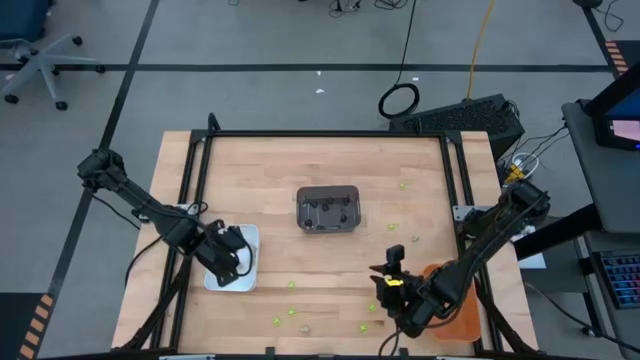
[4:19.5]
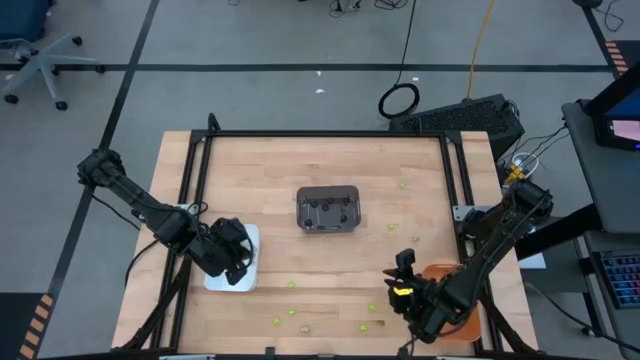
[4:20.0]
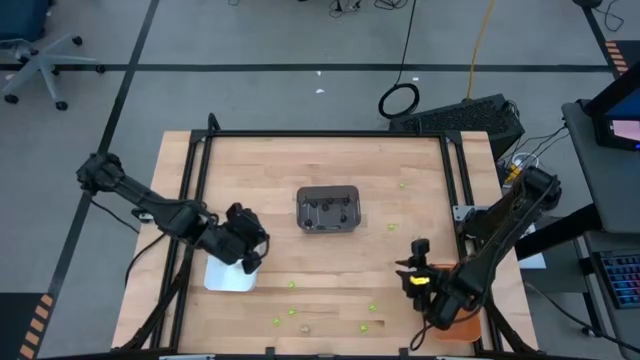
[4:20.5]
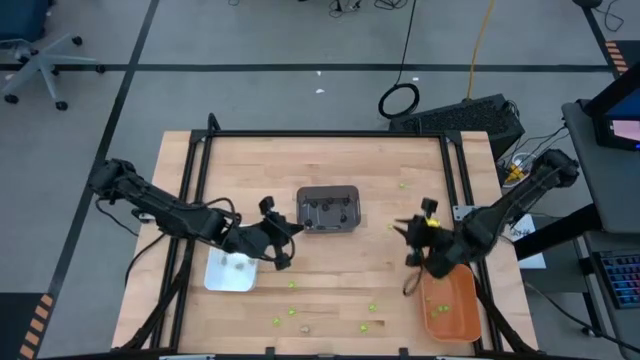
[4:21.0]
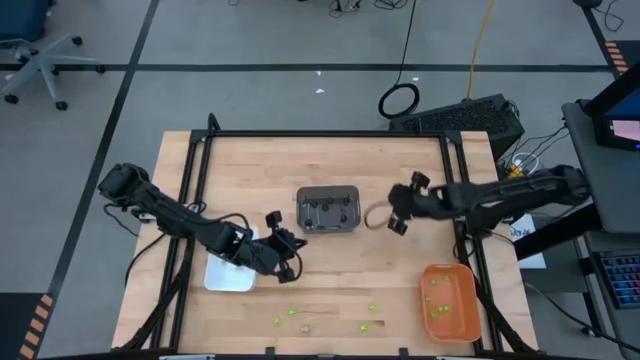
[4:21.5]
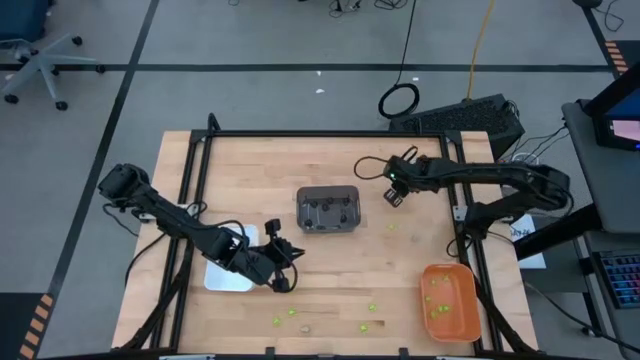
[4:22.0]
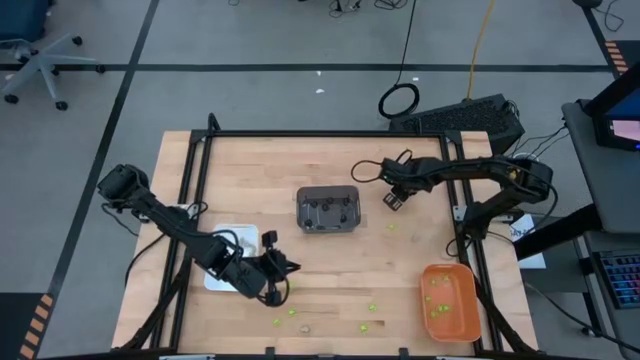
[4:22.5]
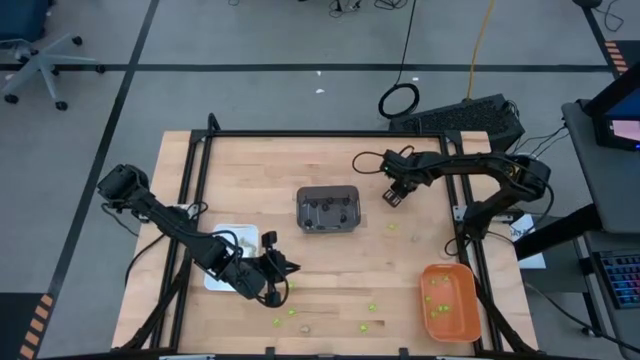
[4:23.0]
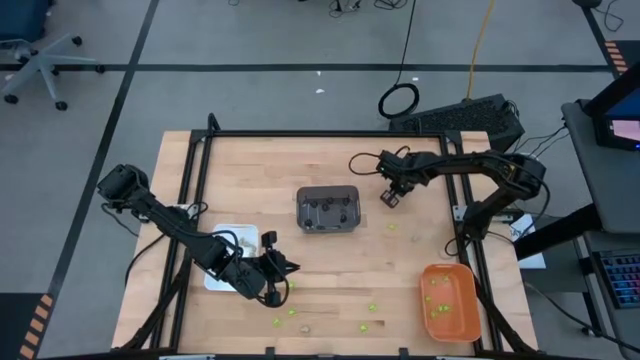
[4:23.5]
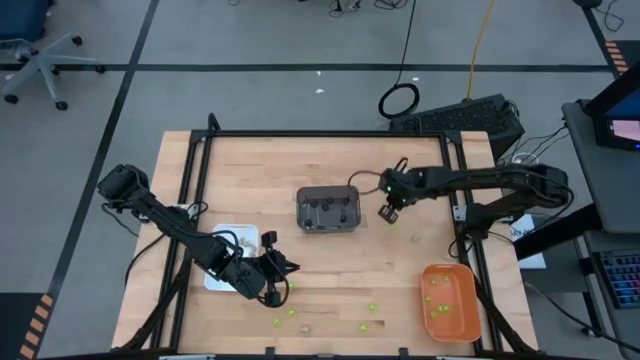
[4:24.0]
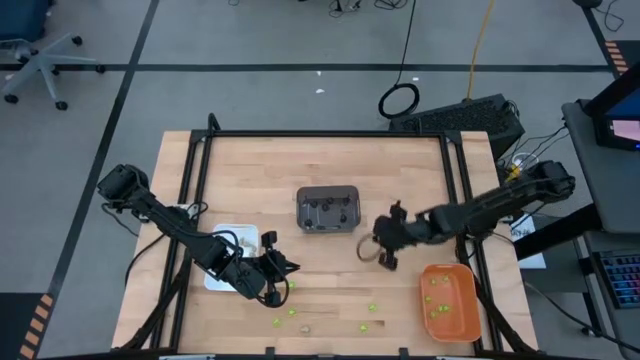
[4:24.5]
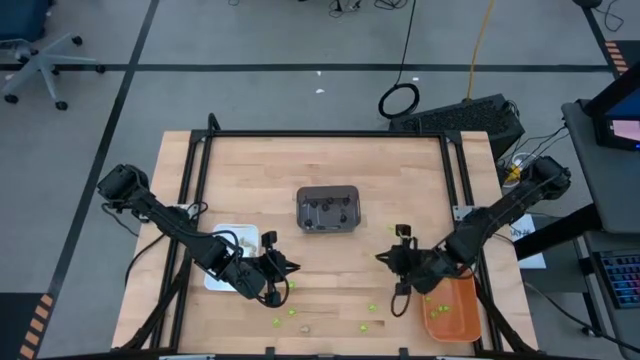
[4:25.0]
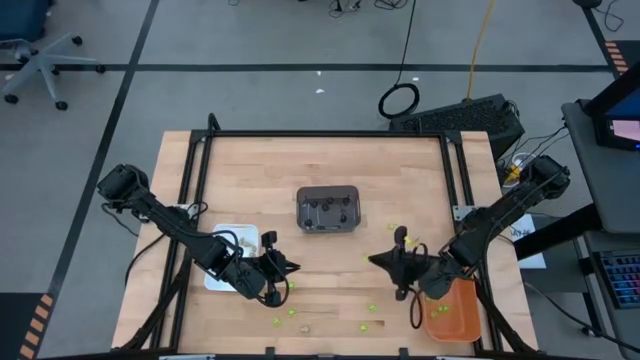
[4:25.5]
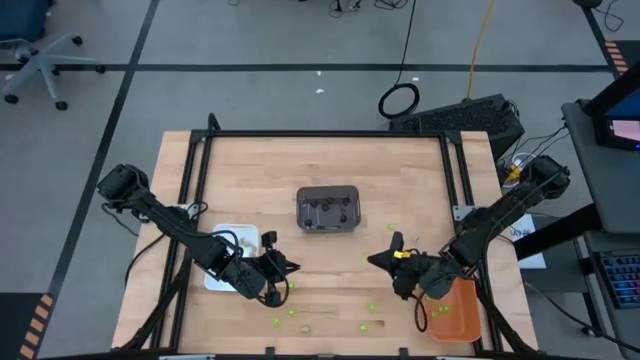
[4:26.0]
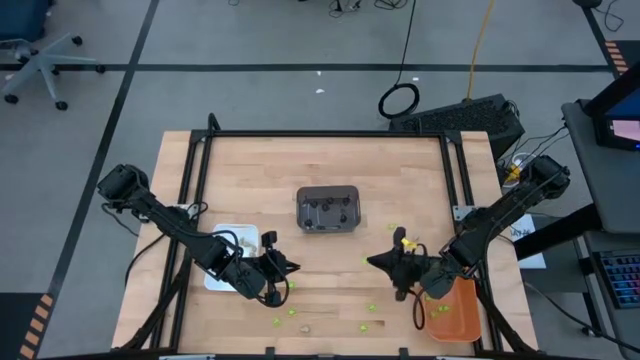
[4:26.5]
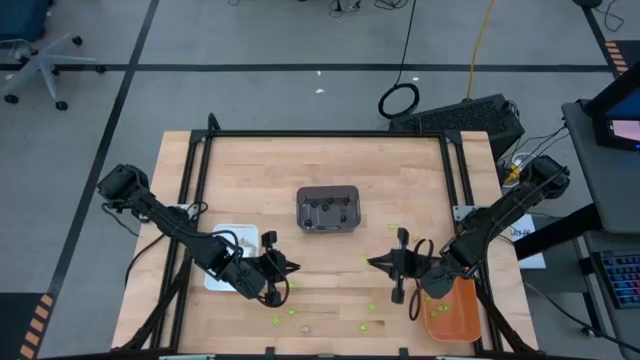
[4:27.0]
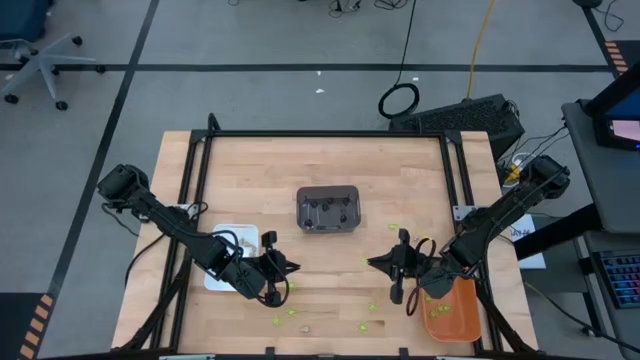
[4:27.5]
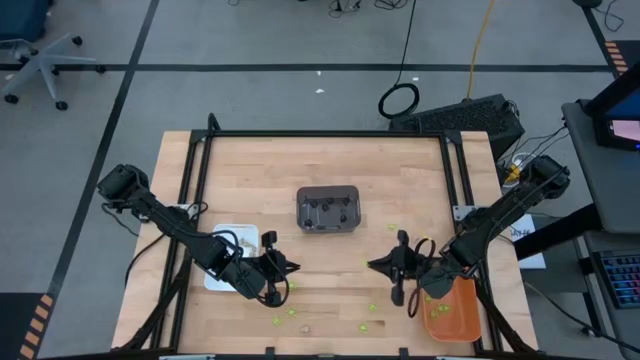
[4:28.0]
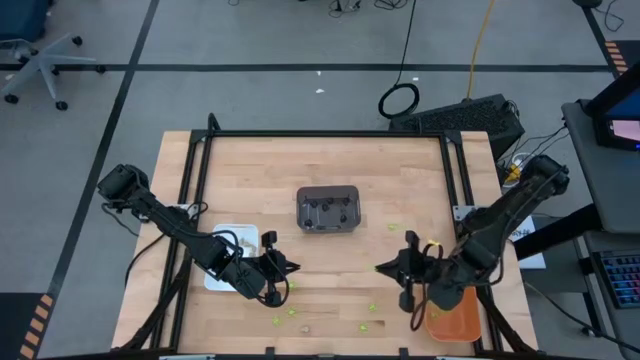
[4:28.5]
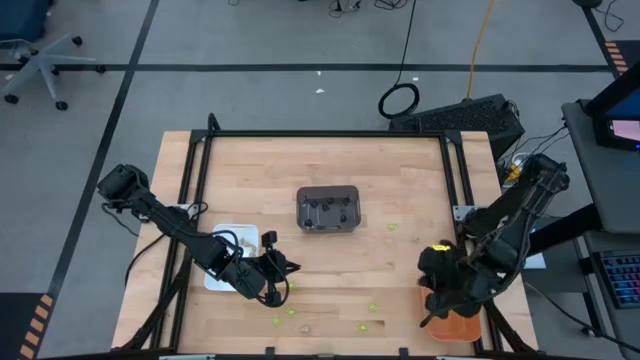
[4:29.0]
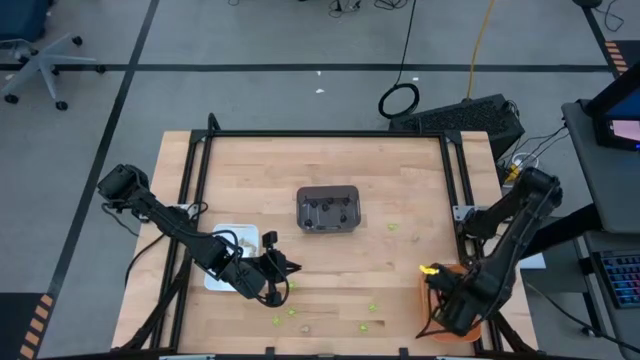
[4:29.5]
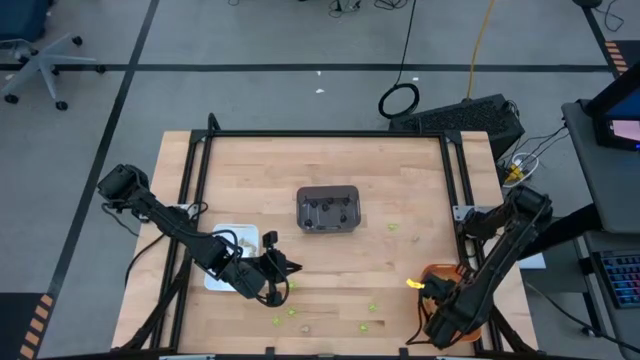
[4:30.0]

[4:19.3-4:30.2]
Task: Sort Halloween decoration
Put the green spider toy into the orange bin

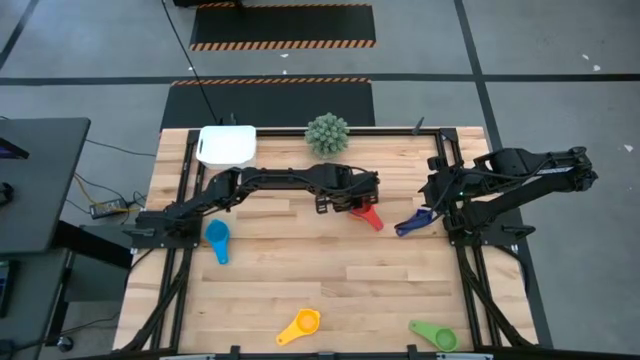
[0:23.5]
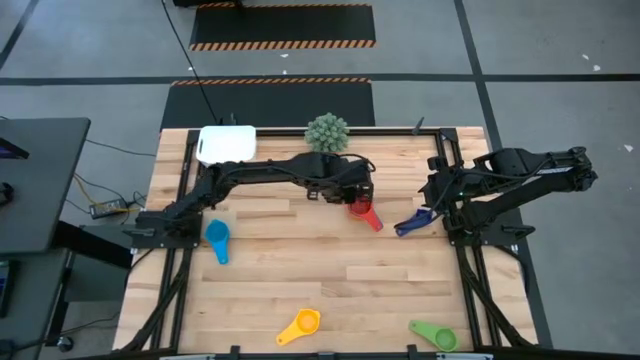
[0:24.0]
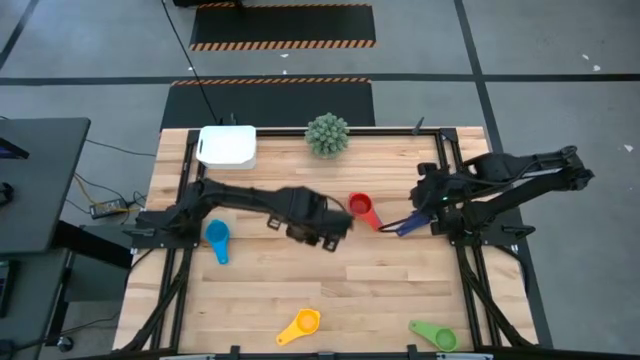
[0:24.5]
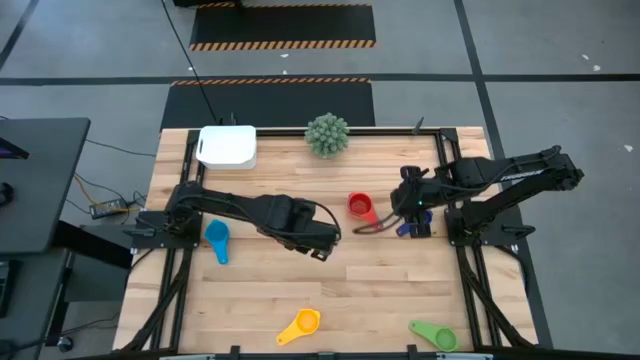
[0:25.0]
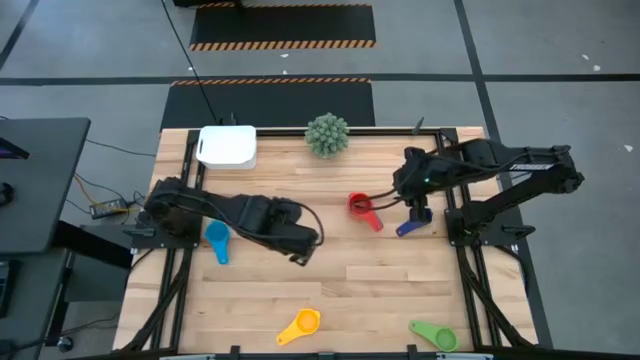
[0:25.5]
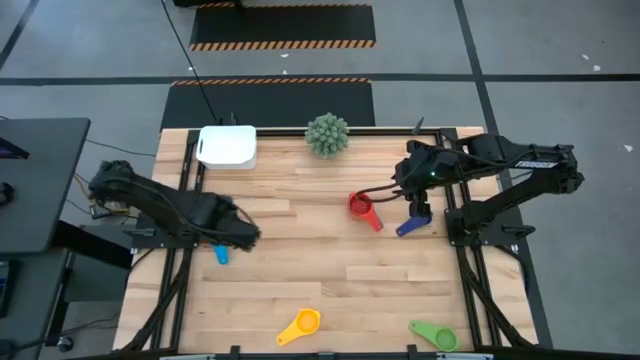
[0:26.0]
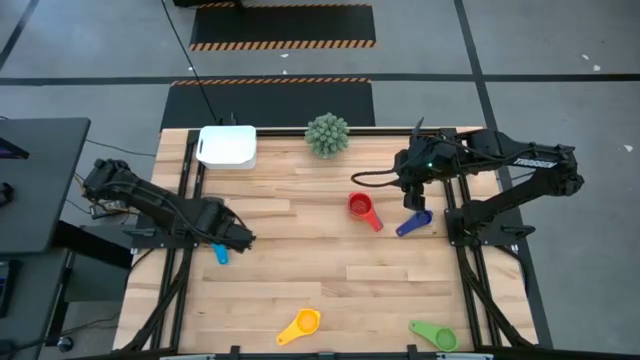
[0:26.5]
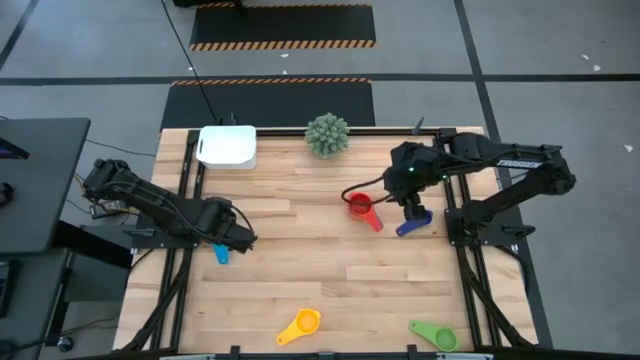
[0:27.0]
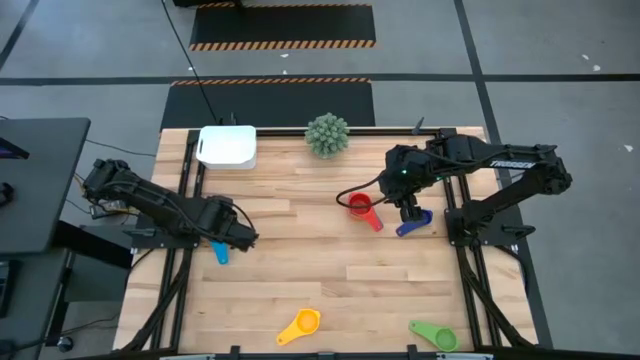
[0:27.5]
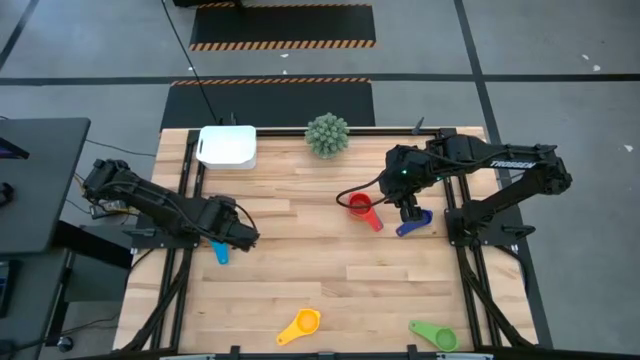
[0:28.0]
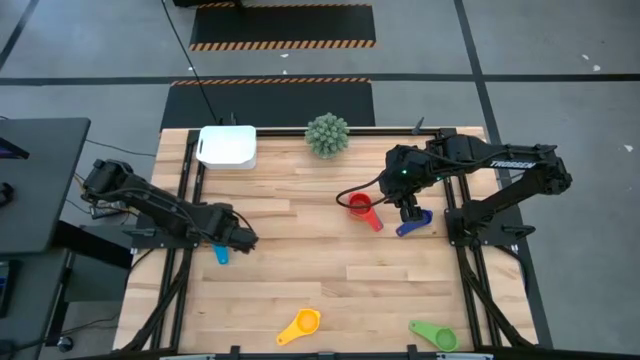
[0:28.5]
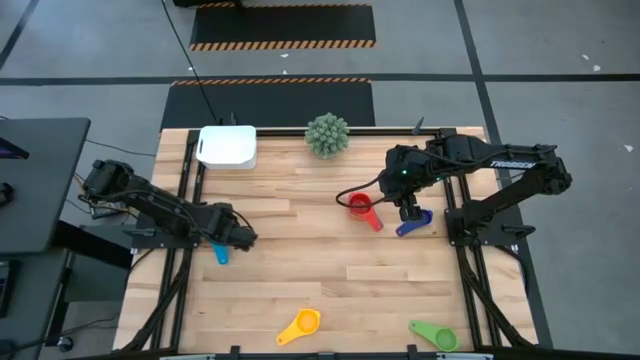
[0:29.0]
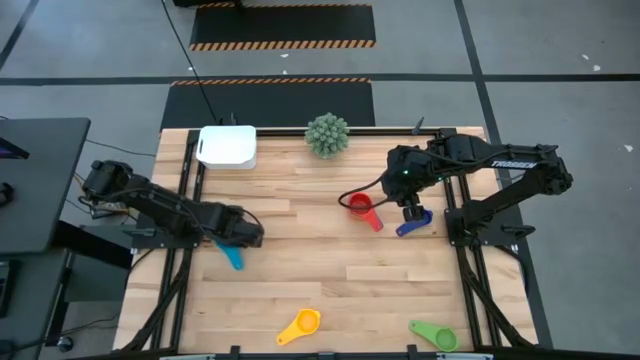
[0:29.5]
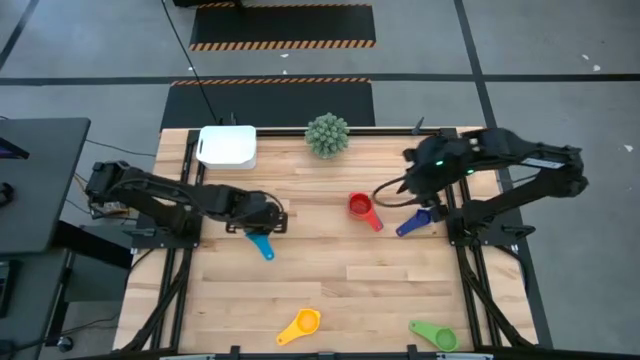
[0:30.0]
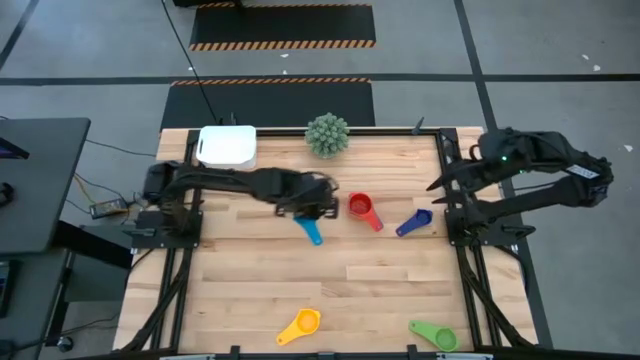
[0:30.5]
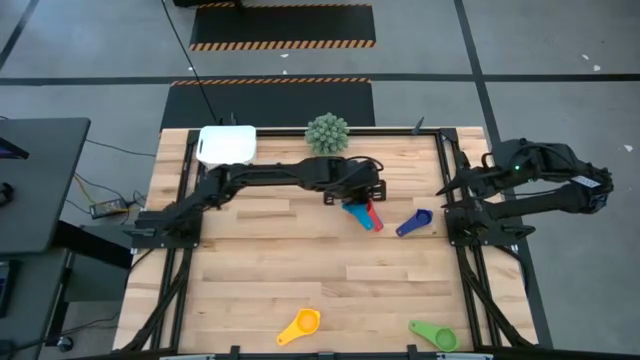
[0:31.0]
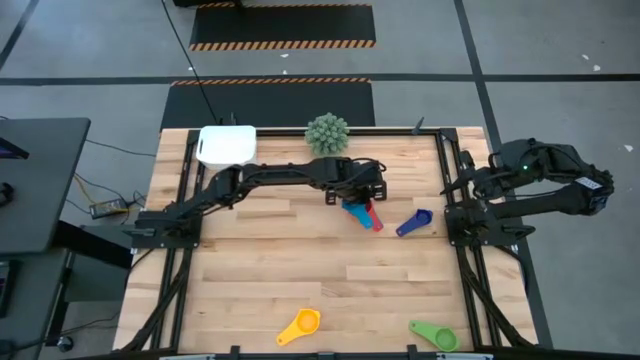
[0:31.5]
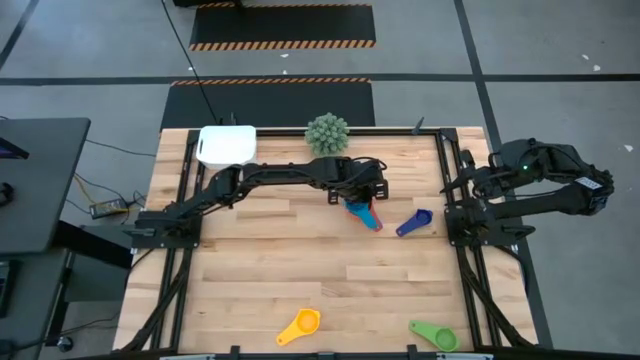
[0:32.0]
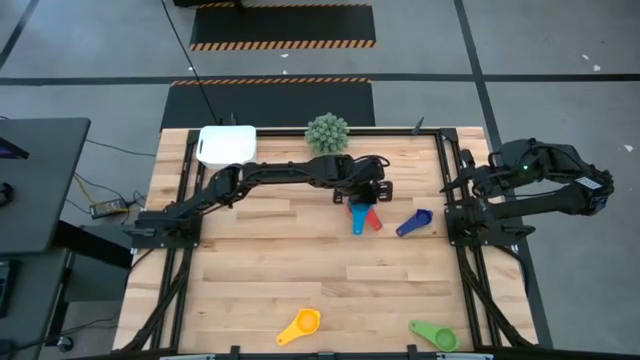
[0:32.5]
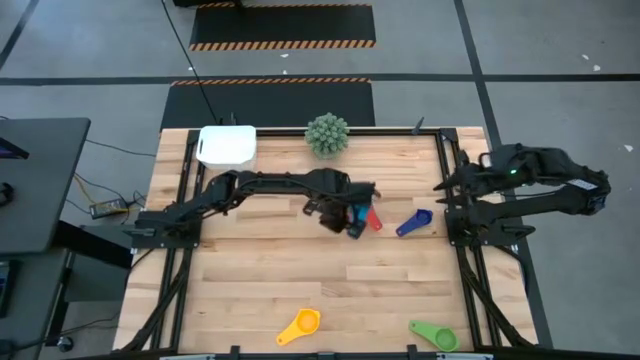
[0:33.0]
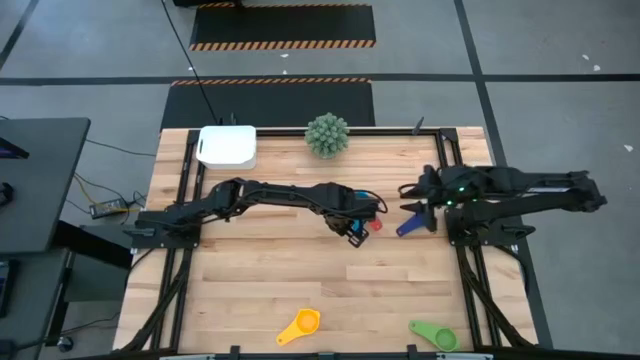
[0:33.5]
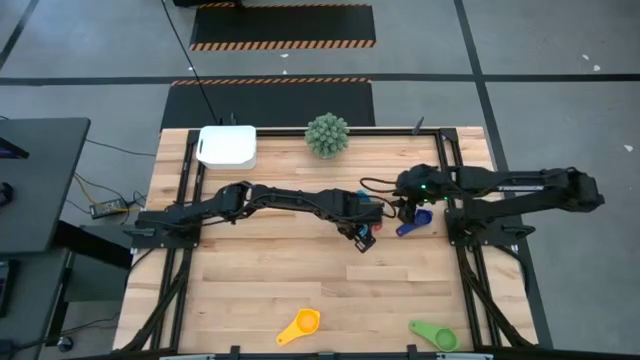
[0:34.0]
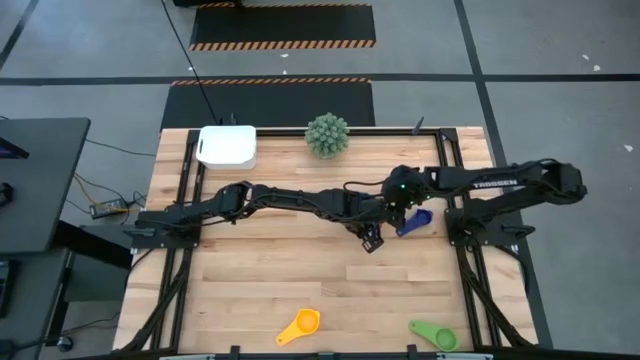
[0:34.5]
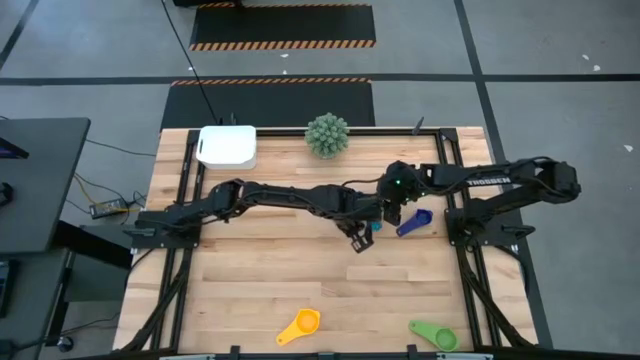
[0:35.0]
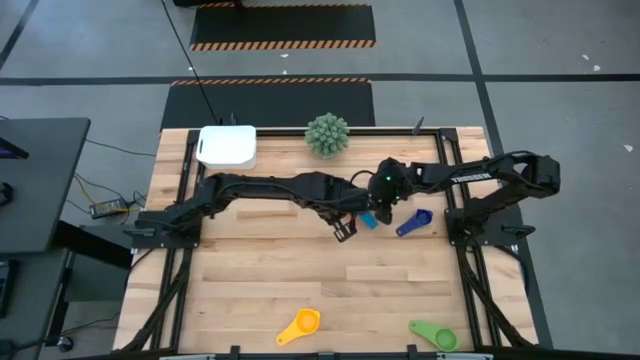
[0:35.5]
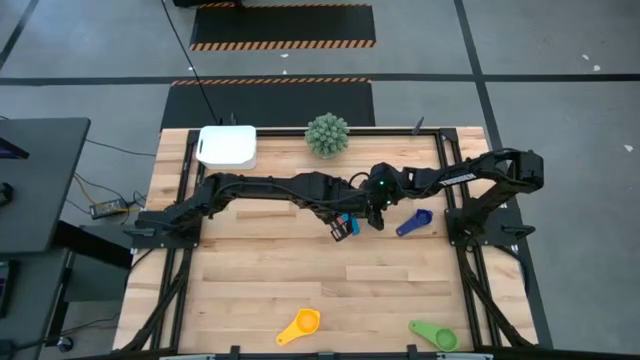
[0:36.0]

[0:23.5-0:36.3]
Task: Nest measuring cups in basket
Stack the light blue measuring cup on top of the red measuring cup
